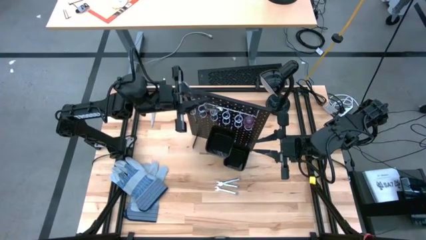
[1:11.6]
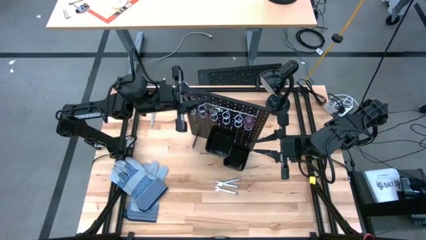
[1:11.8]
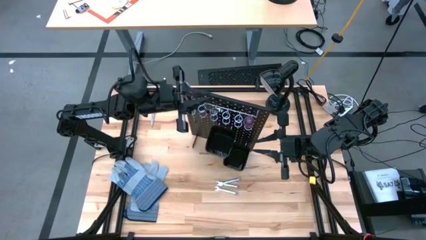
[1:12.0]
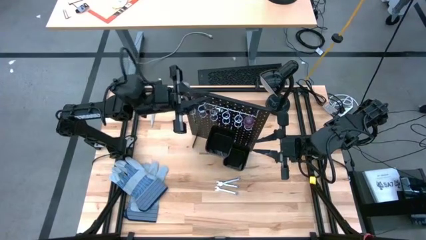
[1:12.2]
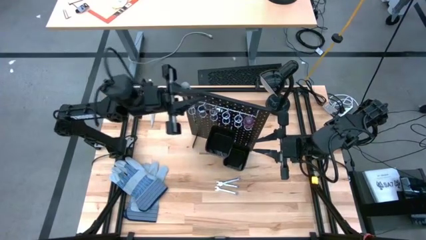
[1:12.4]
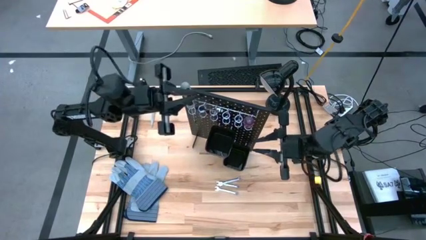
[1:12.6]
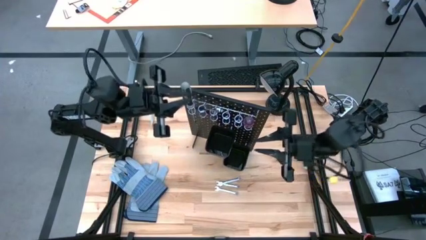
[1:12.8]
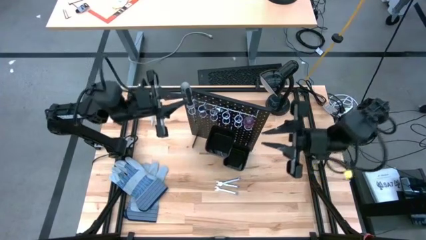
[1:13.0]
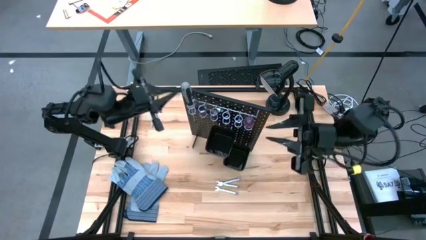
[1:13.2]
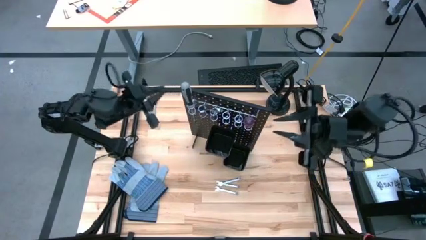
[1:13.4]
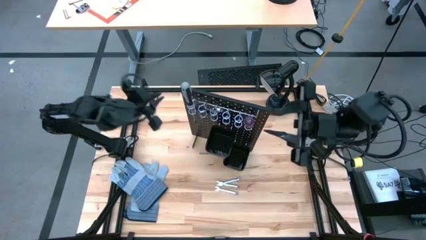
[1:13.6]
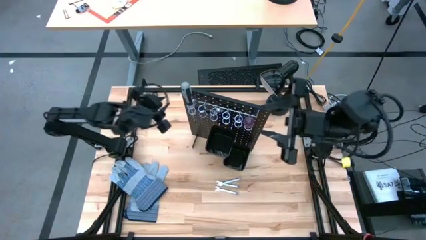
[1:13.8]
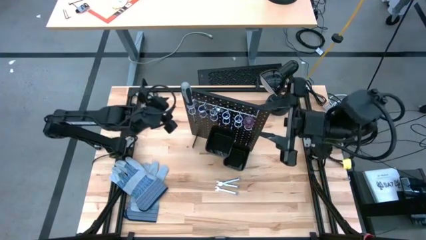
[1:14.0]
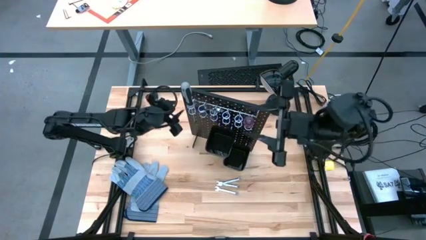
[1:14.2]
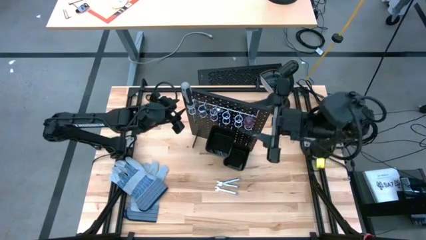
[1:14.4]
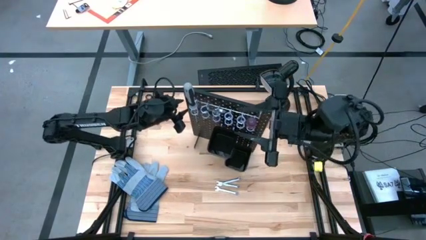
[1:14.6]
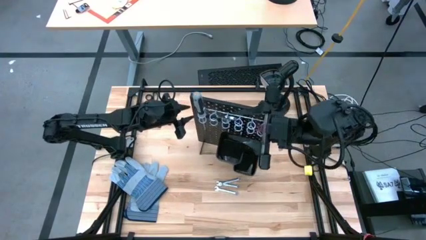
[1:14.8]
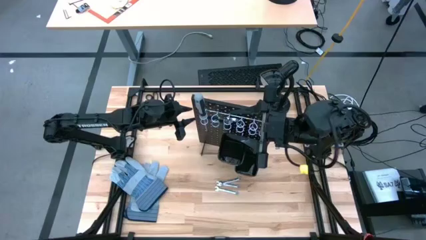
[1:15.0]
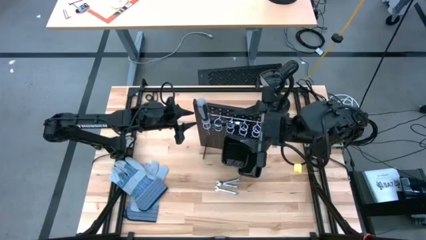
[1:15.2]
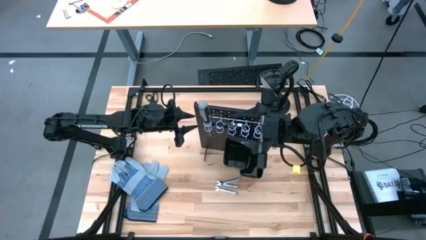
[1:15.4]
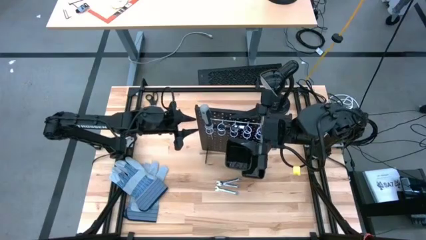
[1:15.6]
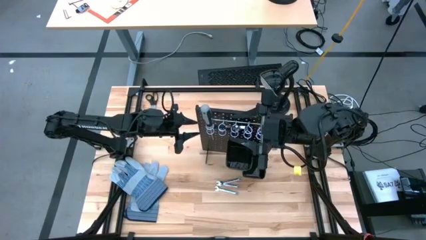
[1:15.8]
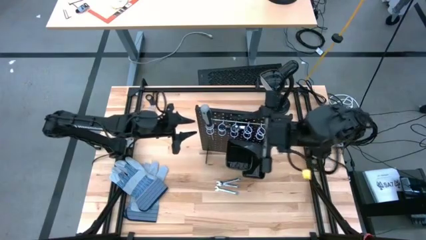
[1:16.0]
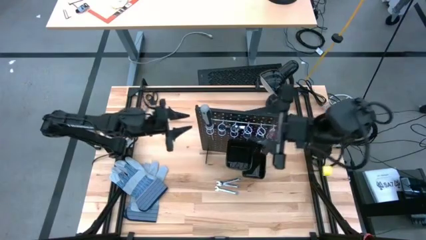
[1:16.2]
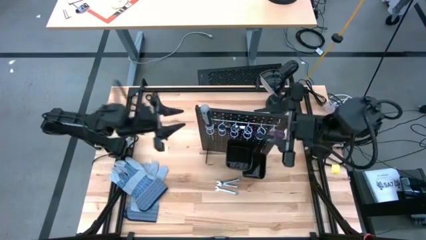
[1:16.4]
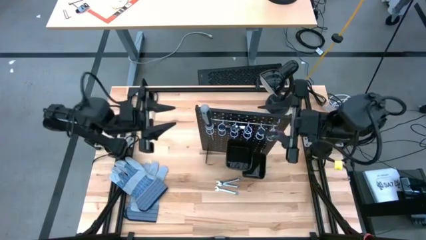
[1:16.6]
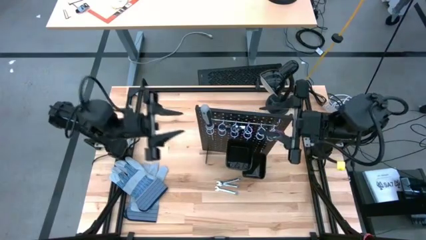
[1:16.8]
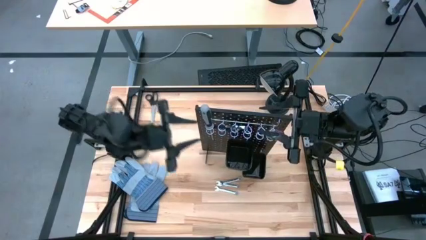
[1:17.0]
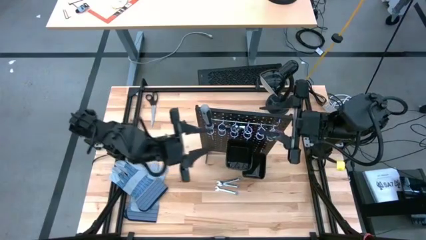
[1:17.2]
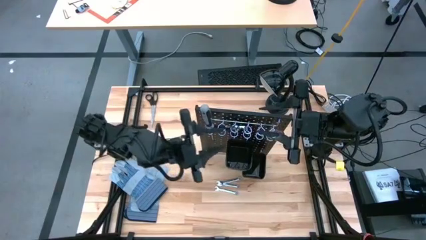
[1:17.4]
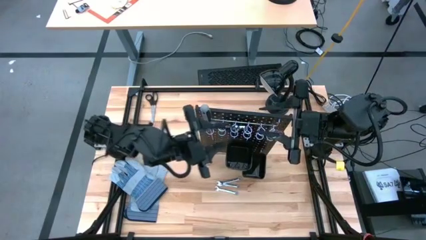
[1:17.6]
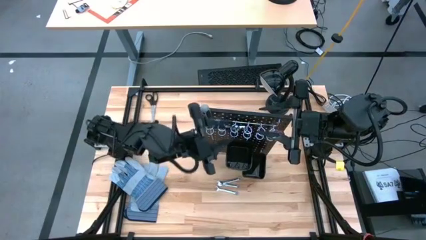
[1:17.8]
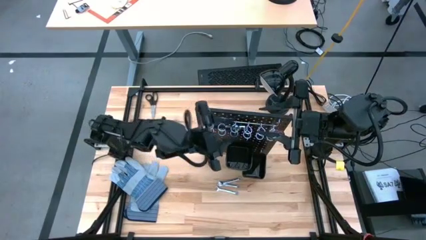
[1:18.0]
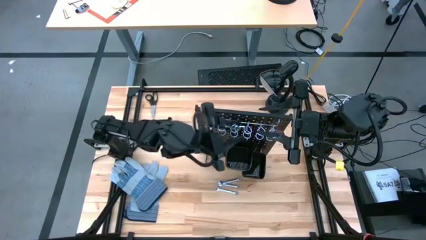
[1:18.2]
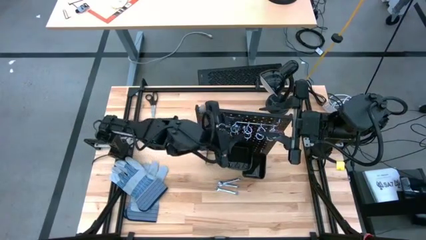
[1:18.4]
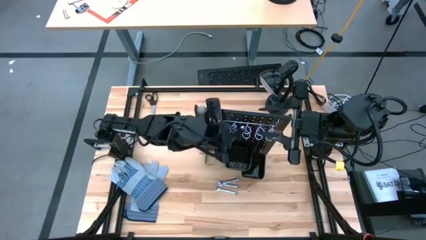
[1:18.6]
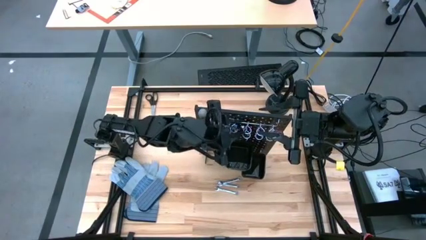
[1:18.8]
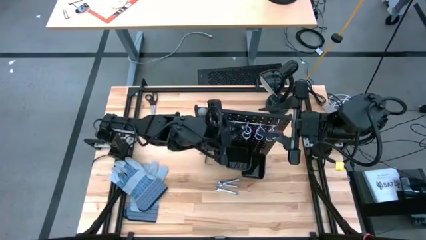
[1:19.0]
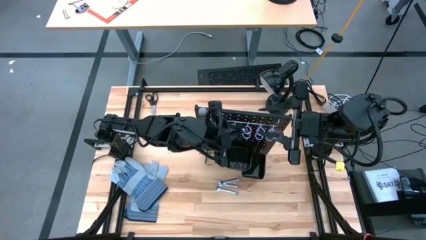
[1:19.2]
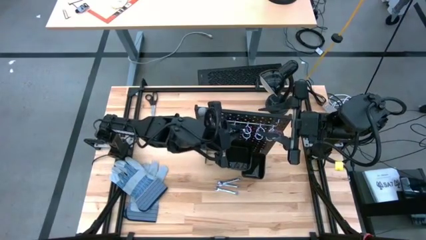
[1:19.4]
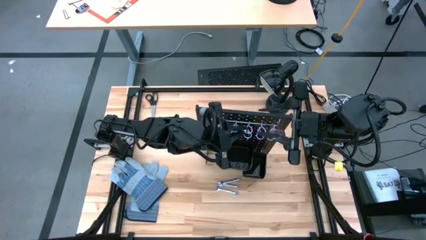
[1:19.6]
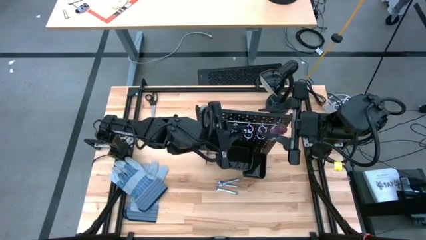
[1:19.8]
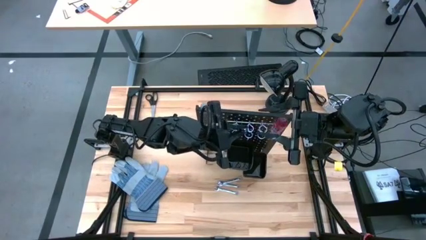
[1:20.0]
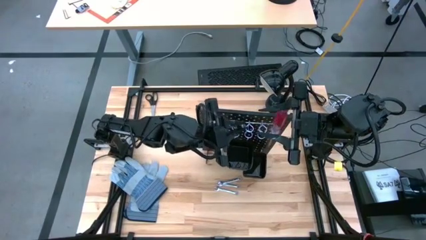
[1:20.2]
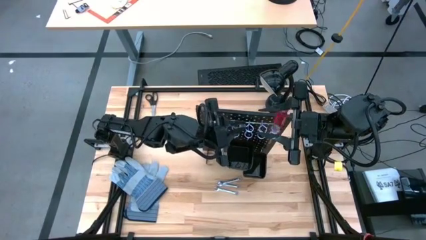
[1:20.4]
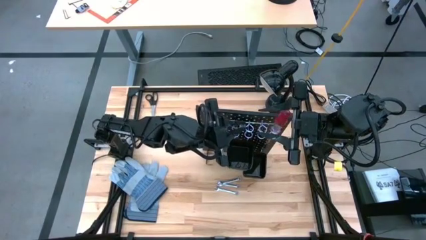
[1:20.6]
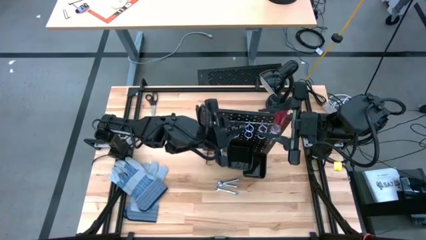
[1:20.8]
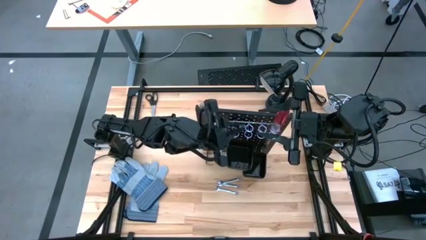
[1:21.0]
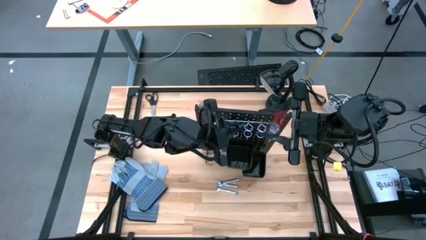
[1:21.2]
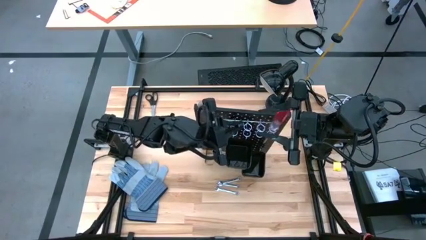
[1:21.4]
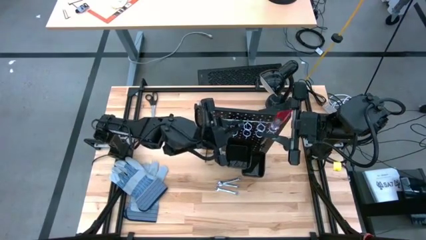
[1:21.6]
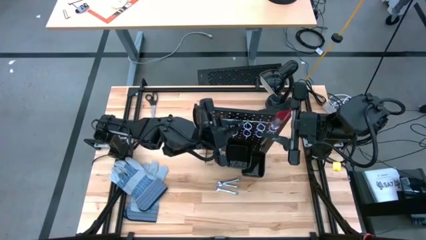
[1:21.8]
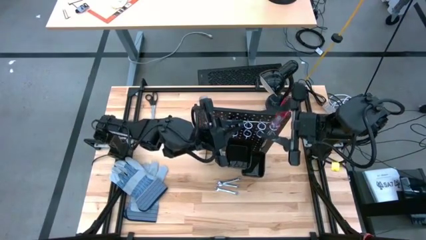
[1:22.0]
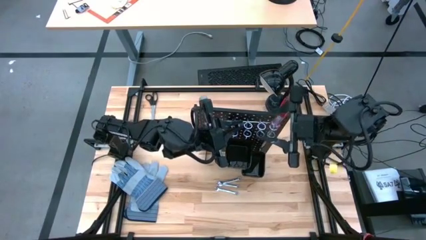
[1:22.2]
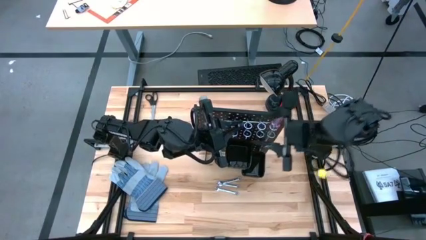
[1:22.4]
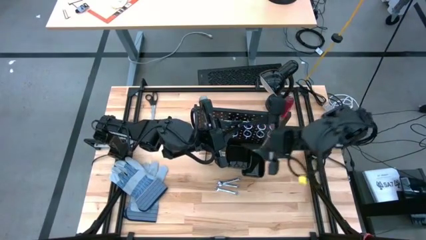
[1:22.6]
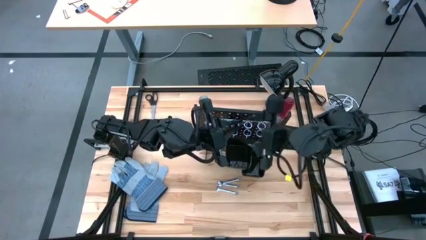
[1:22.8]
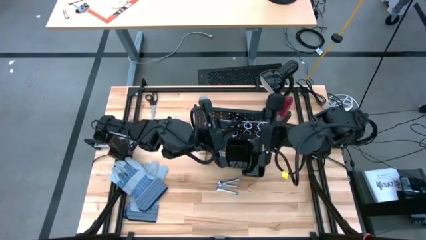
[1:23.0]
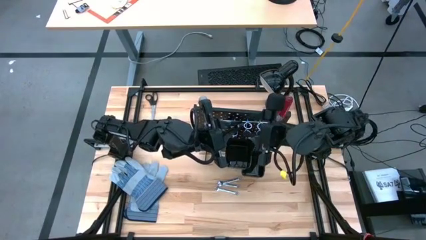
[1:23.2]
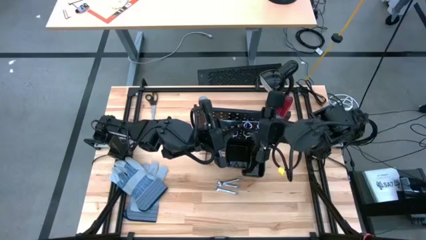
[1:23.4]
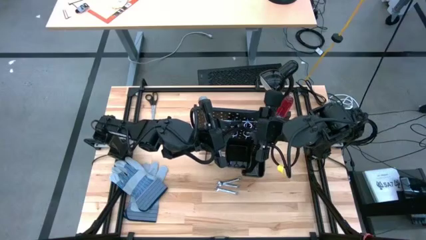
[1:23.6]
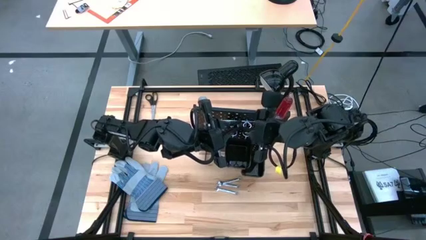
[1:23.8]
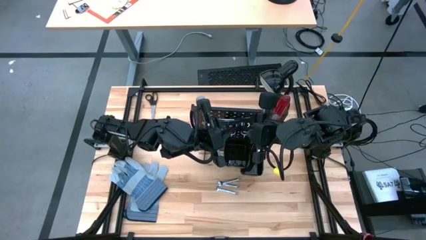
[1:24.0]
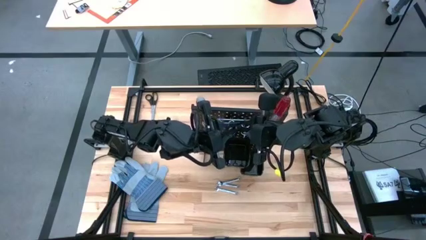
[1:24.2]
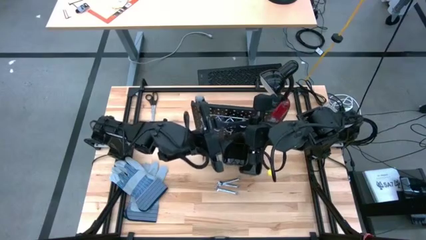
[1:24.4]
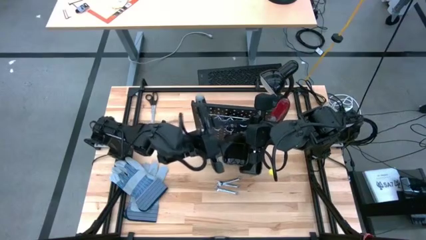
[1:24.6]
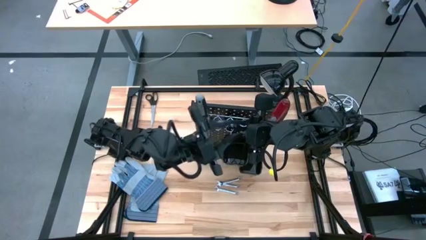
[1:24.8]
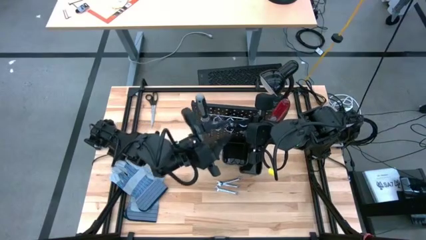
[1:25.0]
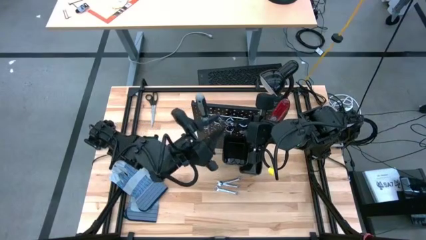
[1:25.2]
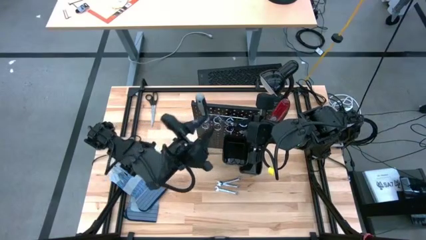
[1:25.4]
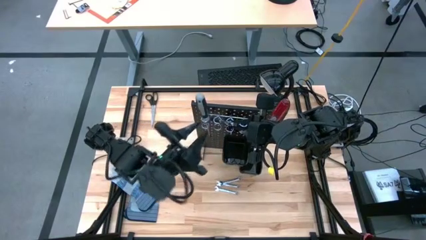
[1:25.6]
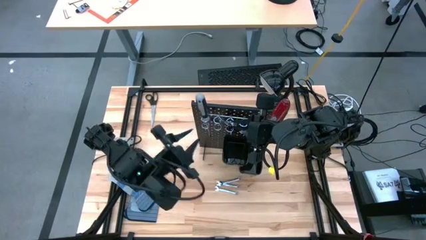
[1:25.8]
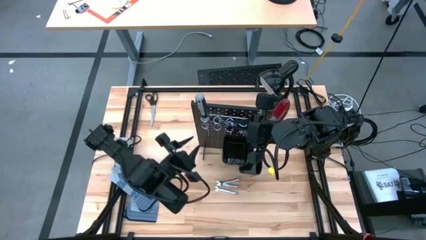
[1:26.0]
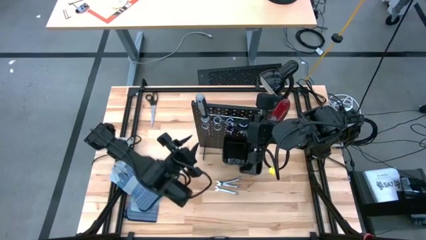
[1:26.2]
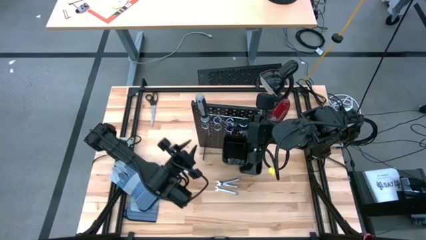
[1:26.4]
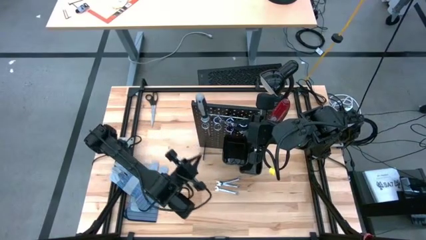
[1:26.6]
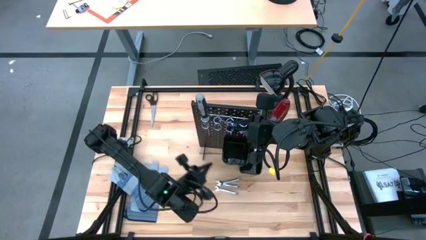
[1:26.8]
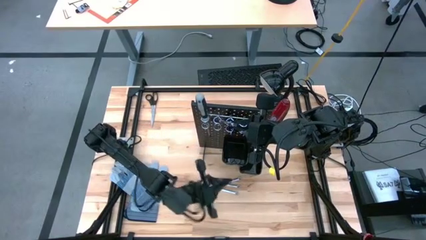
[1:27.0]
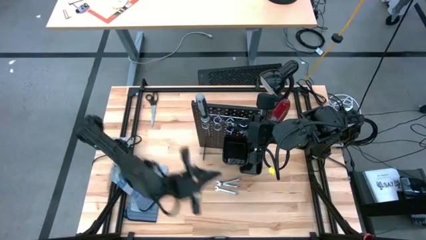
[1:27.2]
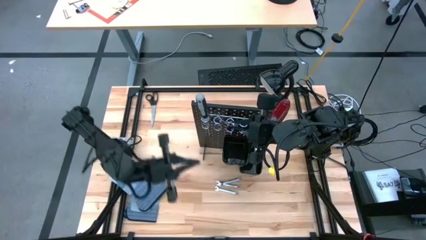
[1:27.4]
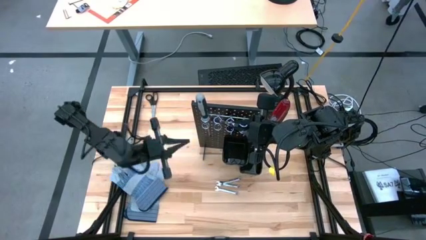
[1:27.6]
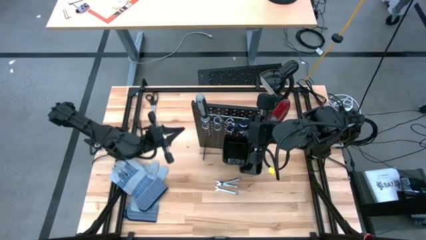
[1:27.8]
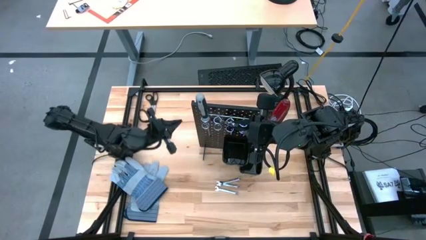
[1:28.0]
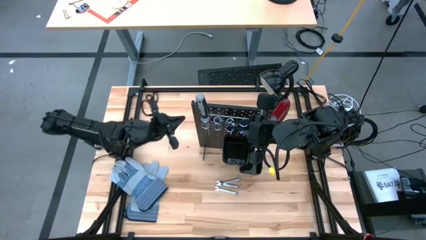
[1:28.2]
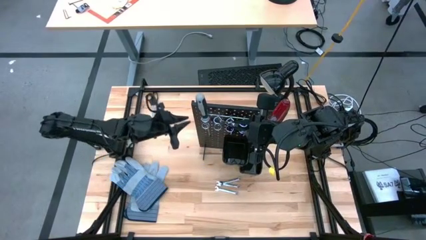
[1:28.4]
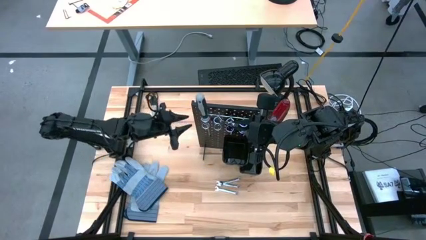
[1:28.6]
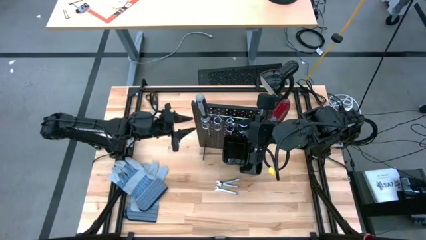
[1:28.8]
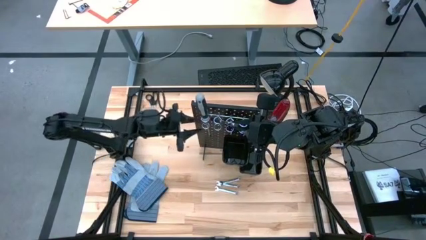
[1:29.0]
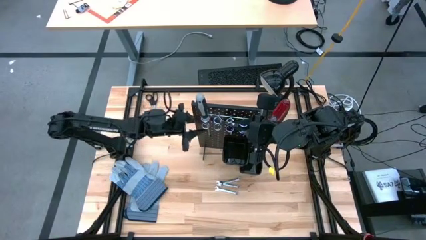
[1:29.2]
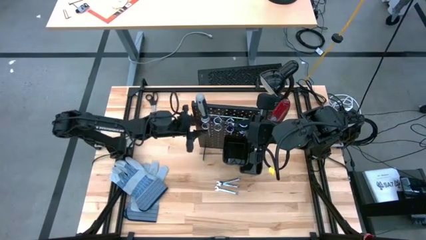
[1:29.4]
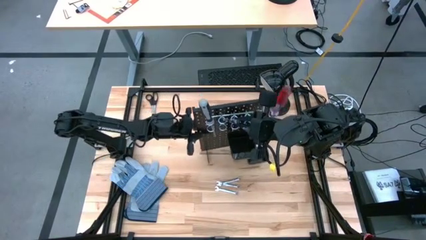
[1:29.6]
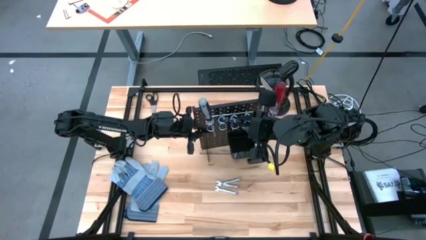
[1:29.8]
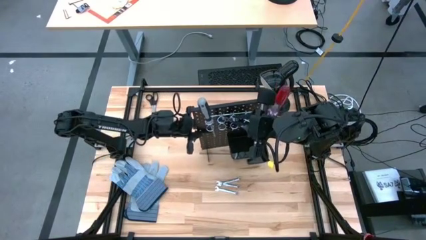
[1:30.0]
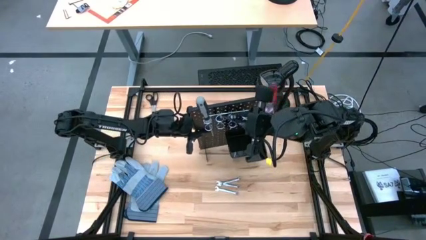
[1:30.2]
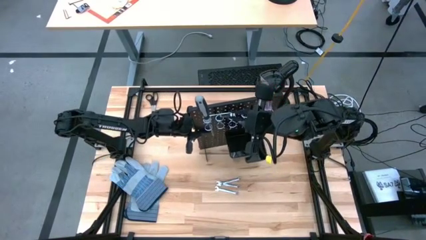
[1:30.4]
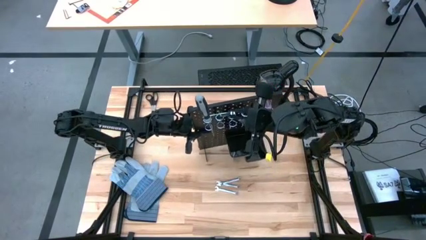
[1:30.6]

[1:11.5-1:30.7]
Task: Hang tools onto peg board
Unhang the black pliers from the black peg board
